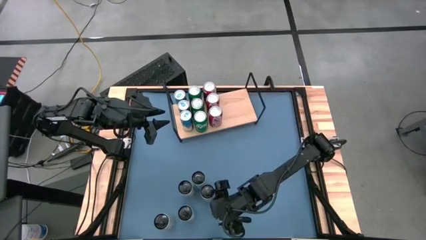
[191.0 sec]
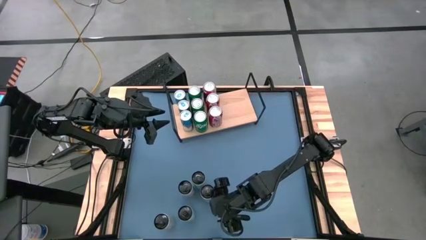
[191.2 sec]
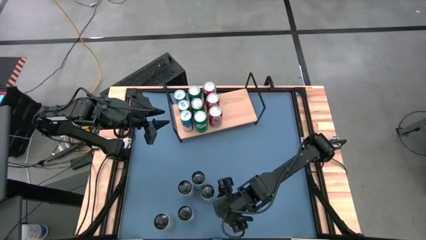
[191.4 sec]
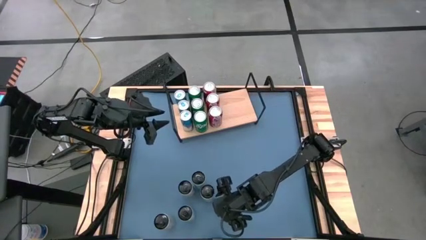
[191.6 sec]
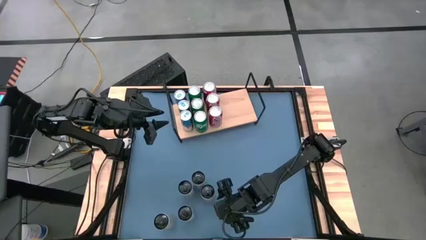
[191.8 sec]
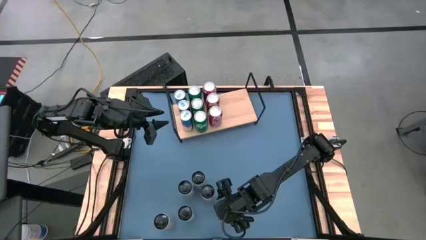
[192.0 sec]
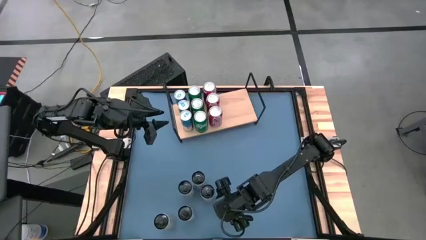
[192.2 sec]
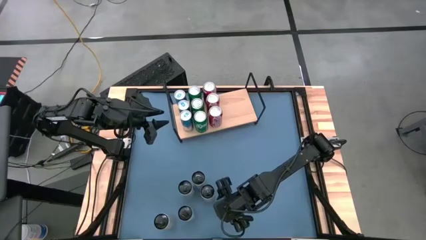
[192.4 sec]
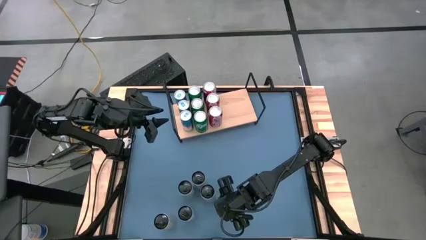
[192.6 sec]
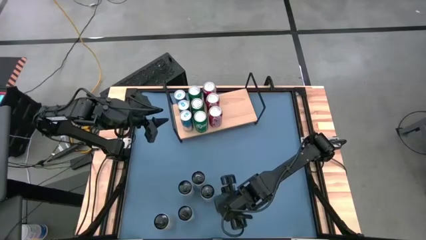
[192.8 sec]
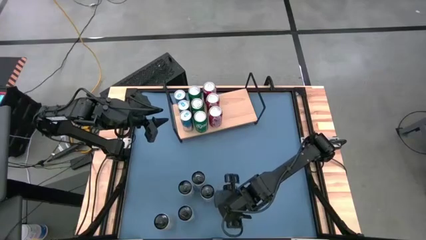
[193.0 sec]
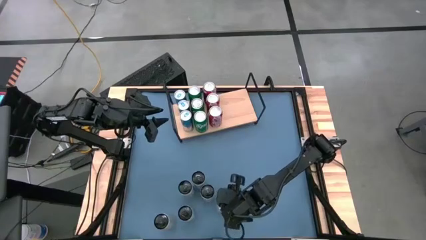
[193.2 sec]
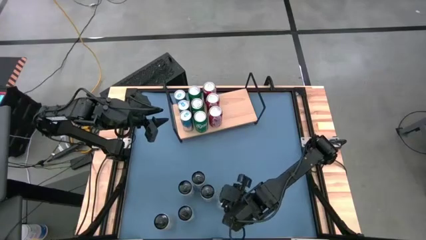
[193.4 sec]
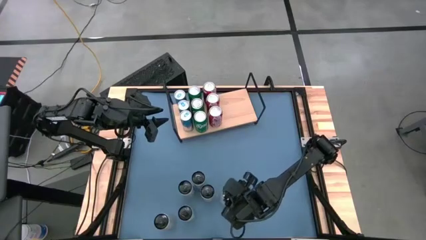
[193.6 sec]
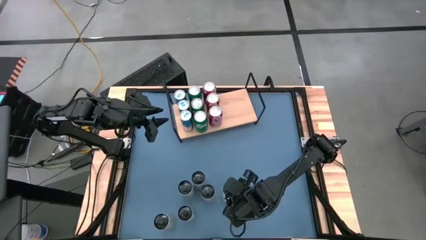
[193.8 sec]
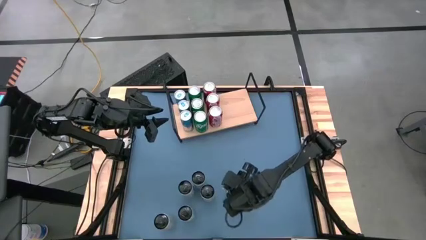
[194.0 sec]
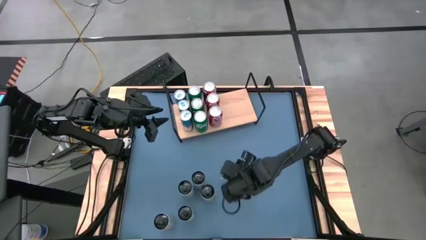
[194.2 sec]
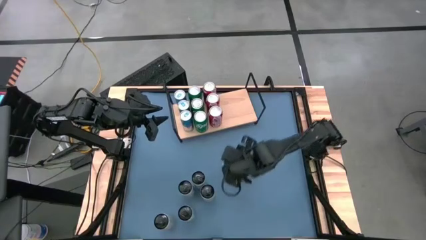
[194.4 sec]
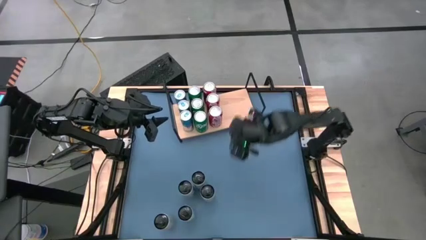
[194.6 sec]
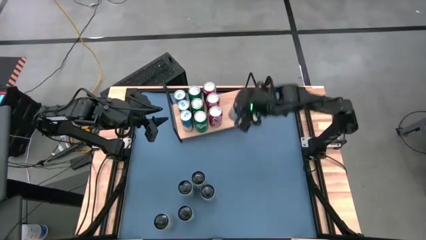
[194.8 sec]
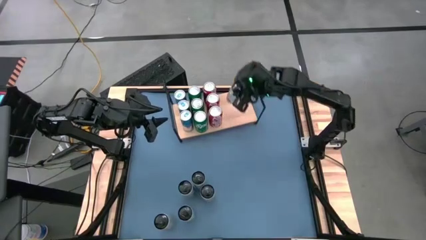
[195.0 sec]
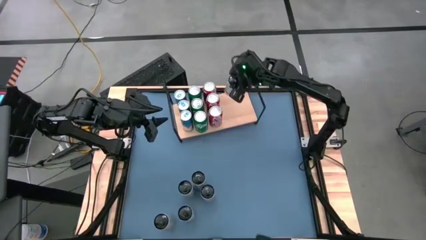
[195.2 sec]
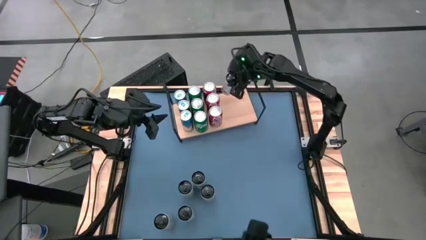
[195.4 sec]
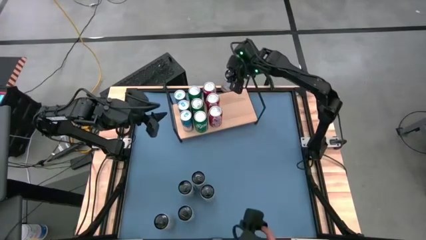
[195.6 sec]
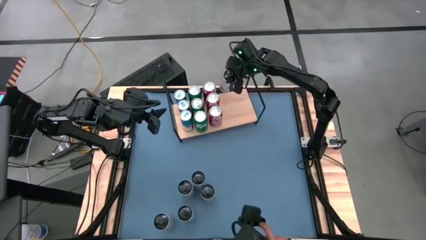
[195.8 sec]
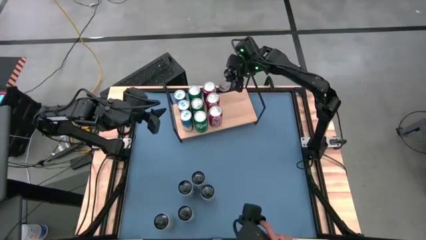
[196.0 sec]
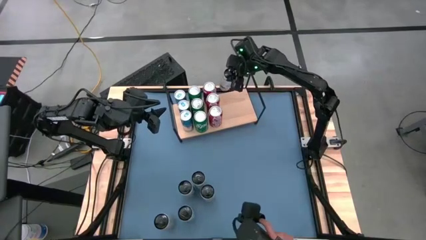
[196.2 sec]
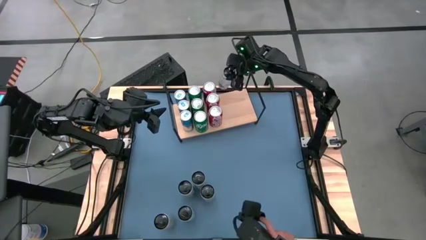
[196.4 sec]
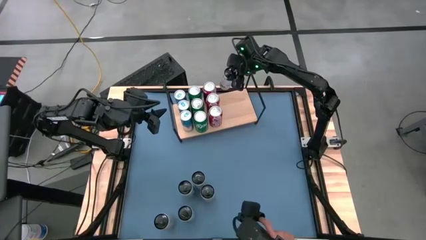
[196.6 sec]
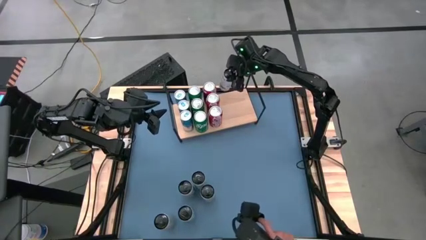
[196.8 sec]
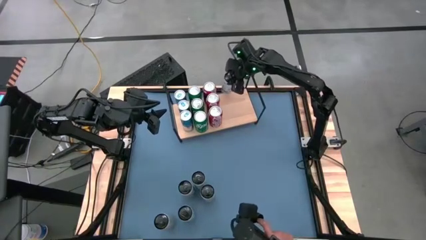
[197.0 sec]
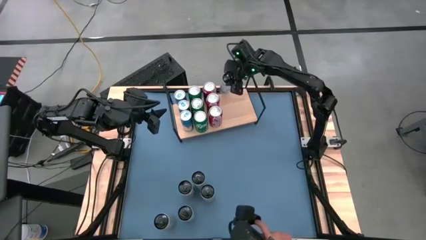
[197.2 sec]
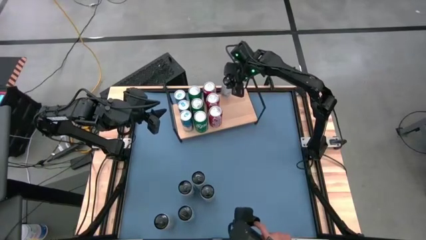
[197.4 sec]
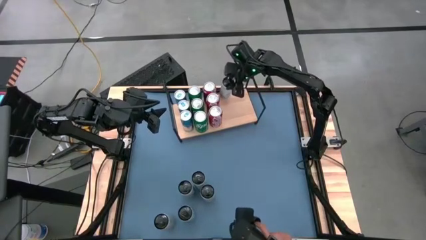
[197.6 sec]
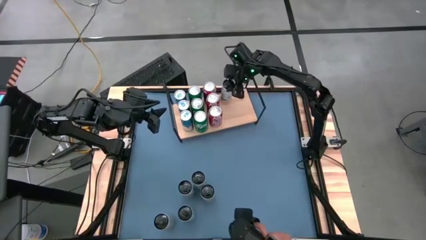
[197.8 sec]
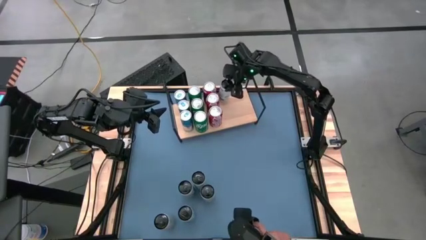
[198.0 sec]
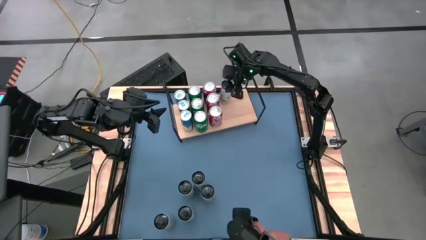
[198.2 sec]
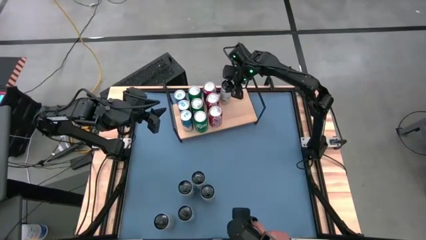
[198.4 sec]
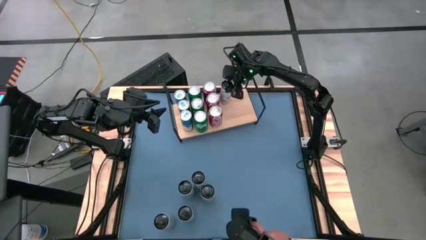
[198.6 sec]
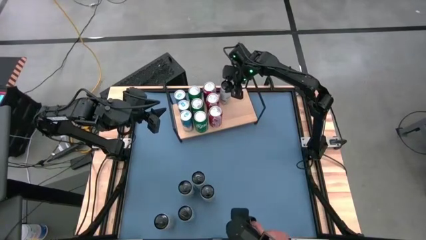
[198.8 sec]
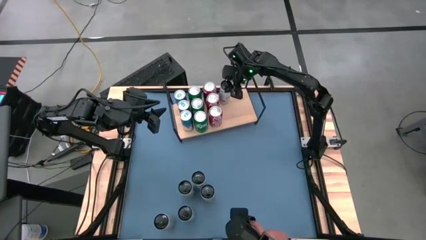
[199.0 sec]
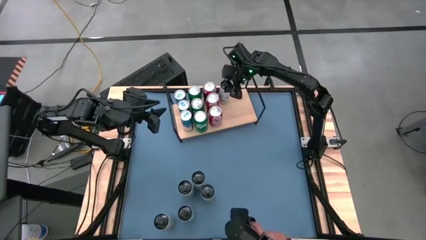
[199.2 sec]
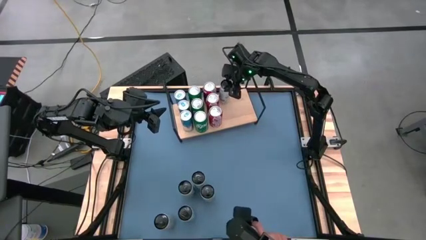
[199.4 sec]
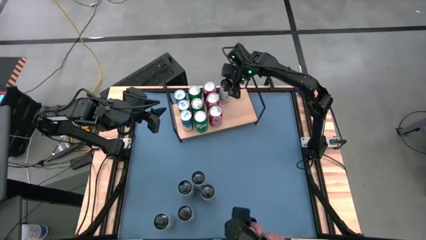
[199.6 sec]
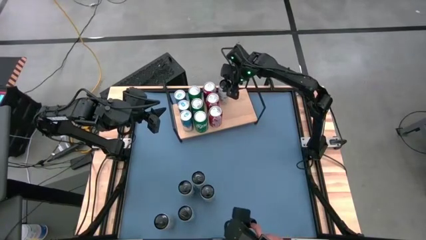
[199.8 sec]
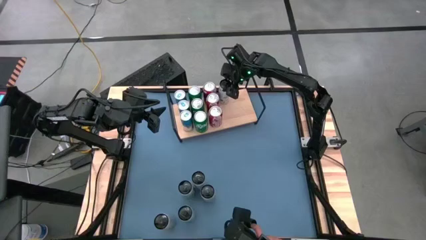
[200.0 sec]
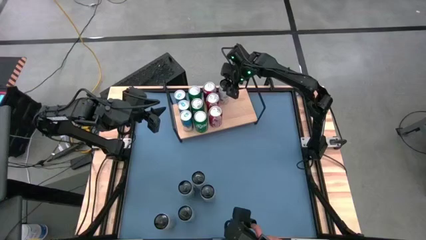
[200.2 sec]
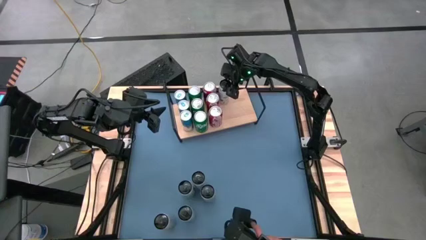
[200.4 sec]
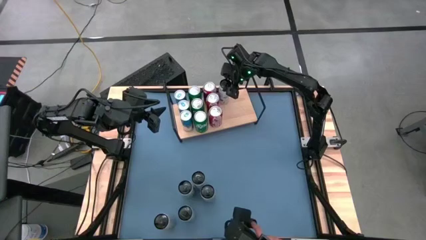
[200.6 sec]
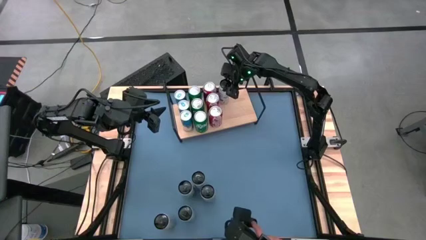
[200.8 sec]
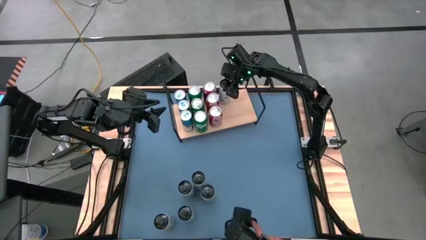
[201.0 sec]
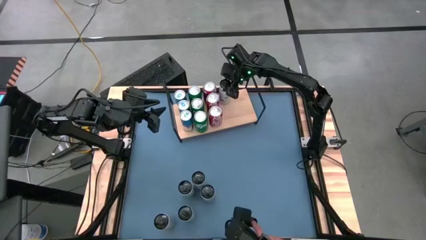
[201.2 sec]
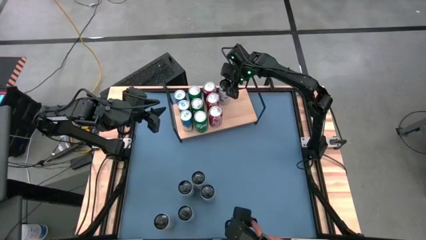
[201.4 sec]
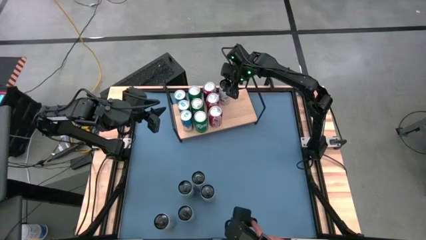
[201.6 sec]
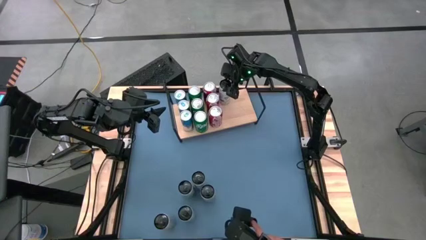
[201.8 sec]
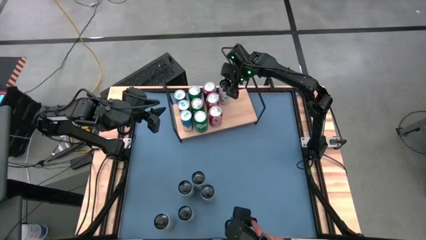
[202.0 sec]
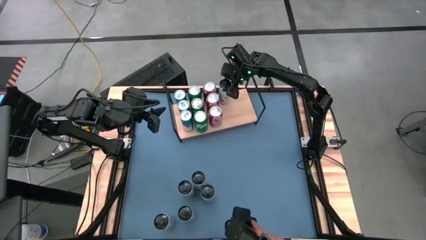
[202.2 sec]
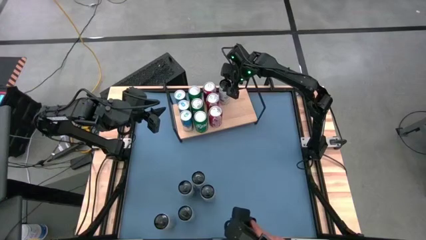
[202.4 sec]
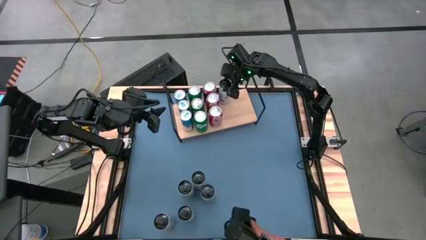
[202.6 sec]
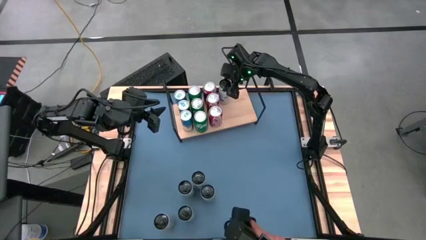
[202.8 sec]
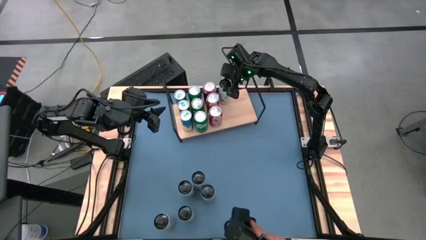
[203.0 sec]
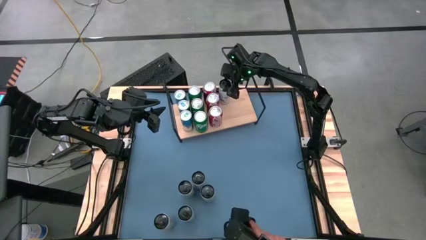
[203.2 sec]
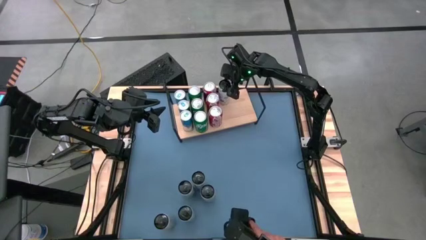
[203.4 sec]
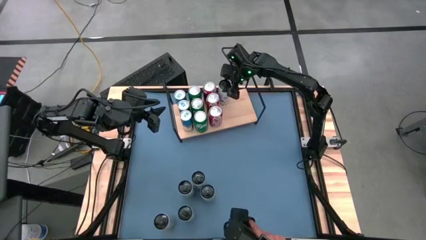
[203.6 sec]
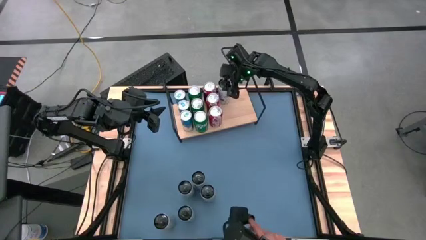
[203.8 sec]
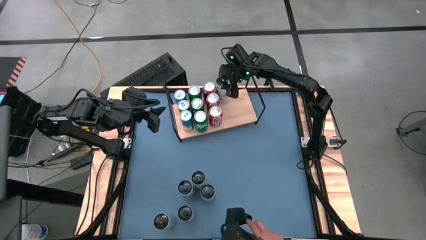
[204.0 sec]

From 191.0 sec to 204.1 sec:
Task: Place canned beverage on shelf
Put the middle white blue soda can on the shelf
